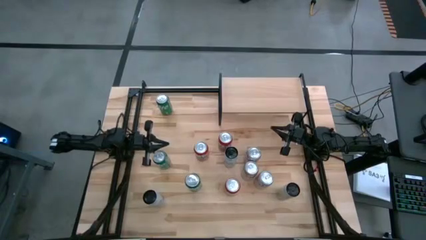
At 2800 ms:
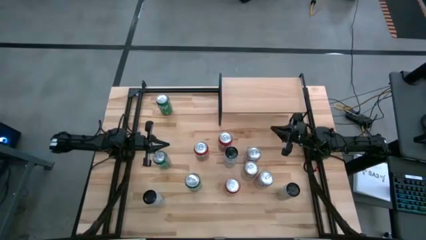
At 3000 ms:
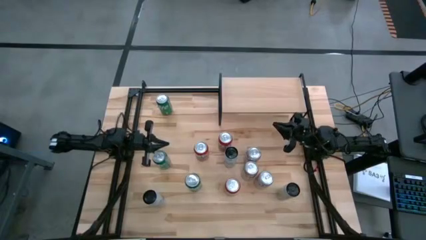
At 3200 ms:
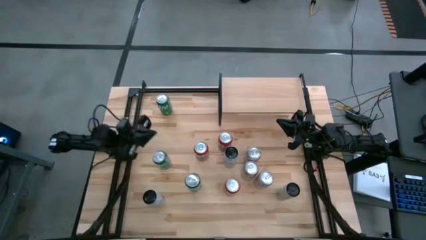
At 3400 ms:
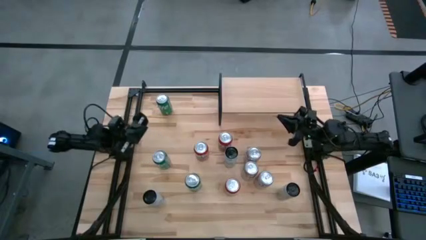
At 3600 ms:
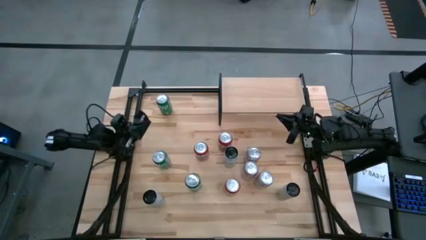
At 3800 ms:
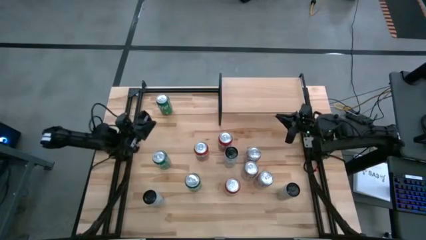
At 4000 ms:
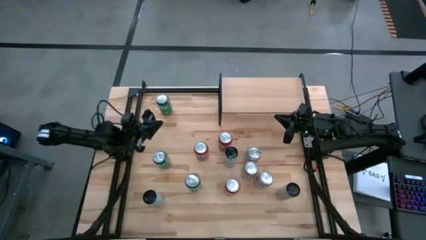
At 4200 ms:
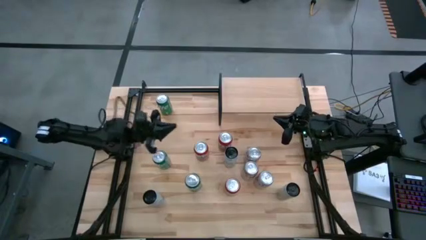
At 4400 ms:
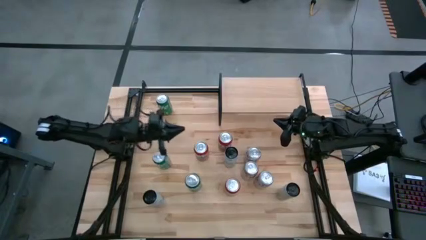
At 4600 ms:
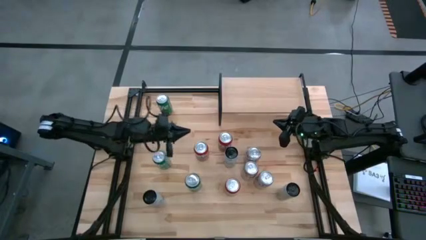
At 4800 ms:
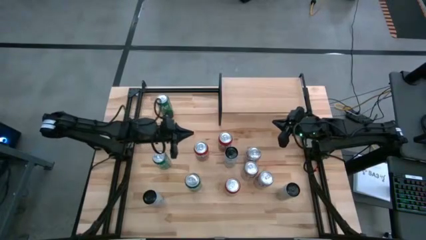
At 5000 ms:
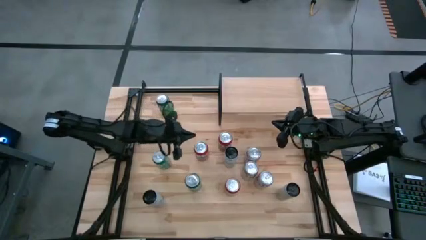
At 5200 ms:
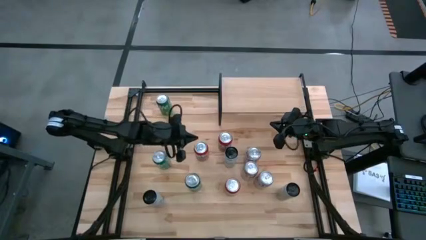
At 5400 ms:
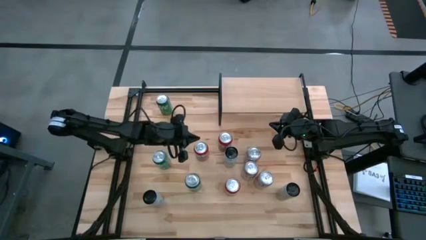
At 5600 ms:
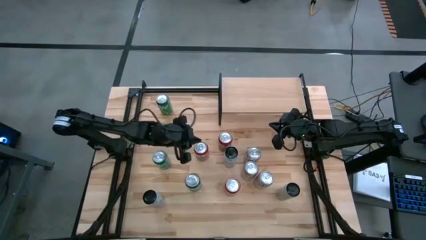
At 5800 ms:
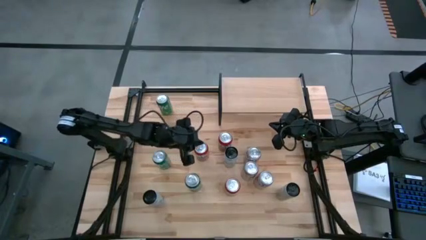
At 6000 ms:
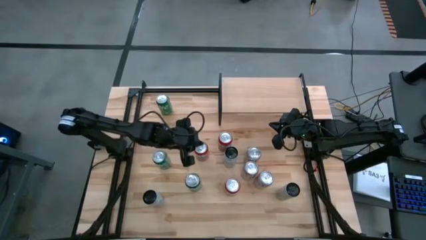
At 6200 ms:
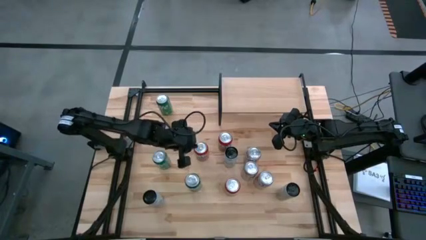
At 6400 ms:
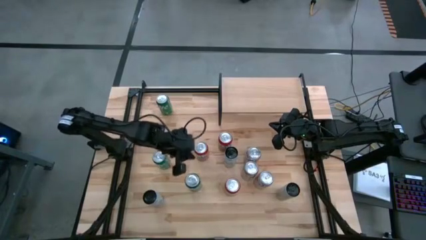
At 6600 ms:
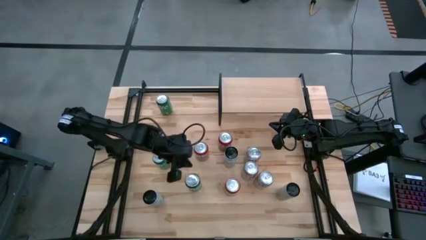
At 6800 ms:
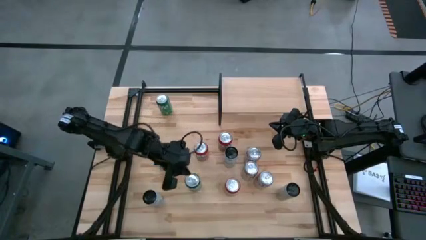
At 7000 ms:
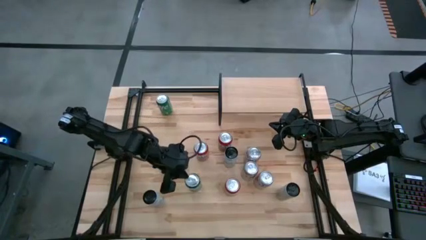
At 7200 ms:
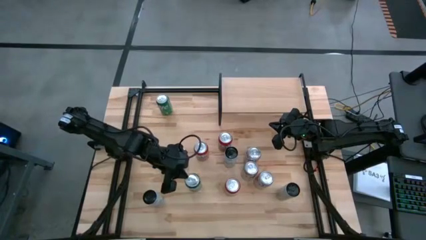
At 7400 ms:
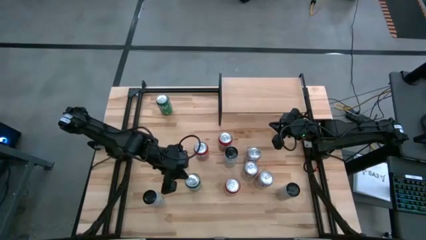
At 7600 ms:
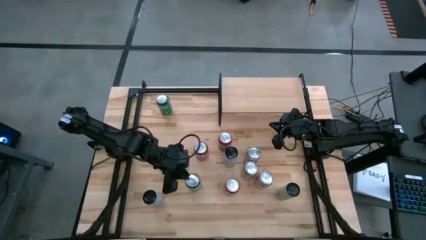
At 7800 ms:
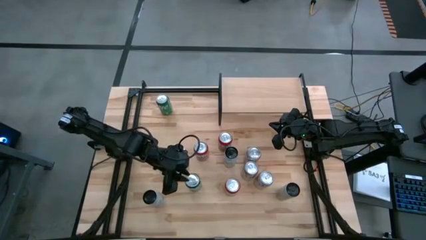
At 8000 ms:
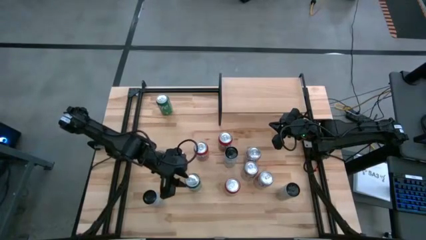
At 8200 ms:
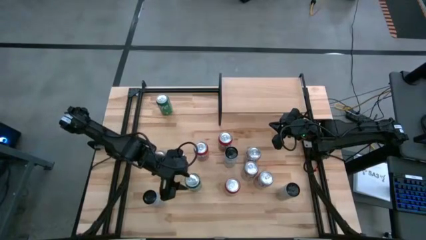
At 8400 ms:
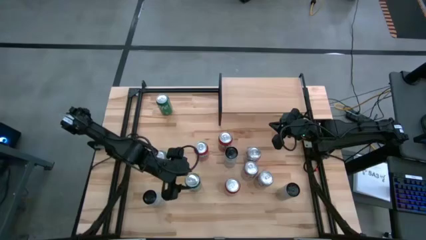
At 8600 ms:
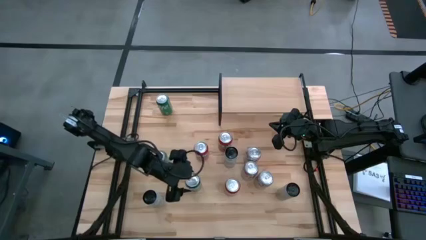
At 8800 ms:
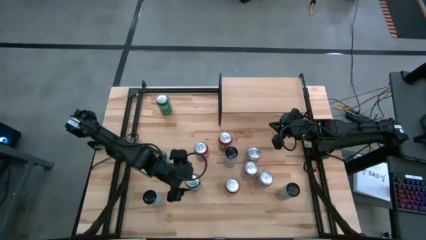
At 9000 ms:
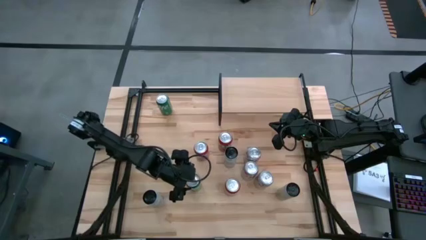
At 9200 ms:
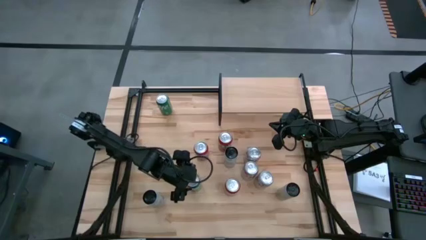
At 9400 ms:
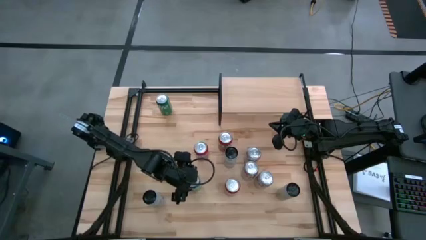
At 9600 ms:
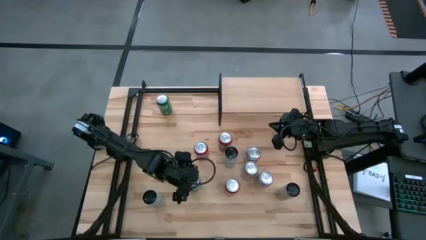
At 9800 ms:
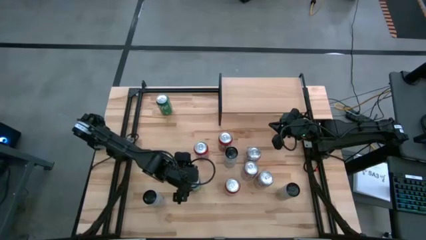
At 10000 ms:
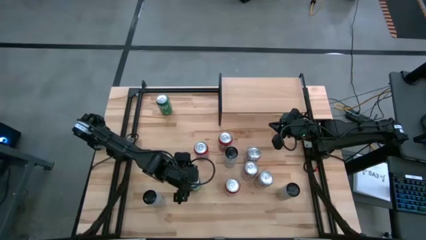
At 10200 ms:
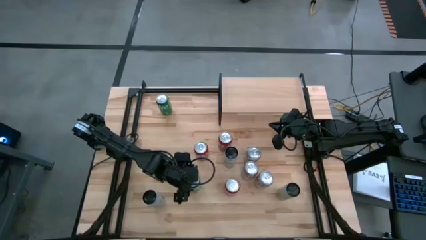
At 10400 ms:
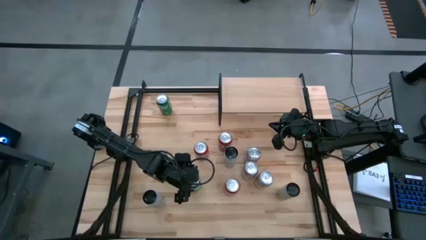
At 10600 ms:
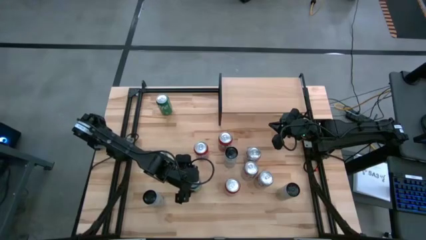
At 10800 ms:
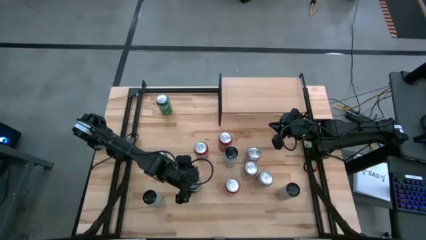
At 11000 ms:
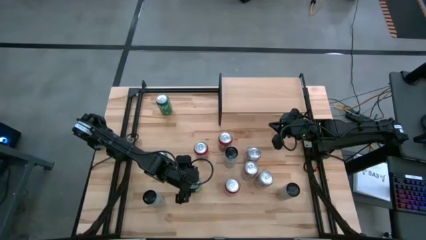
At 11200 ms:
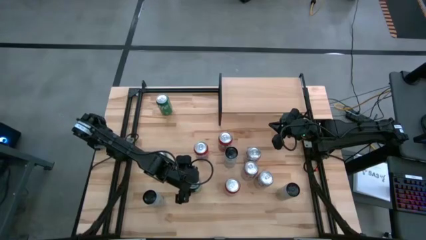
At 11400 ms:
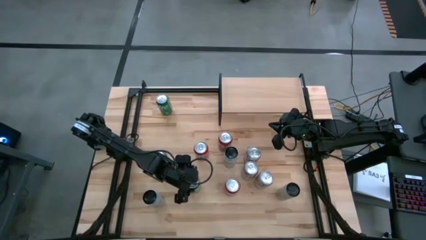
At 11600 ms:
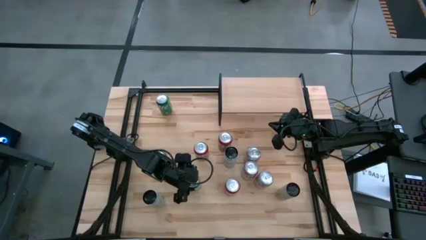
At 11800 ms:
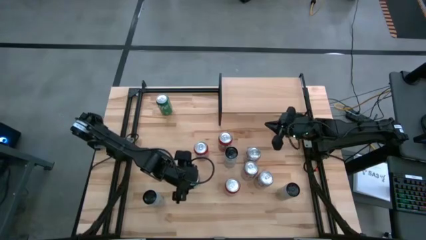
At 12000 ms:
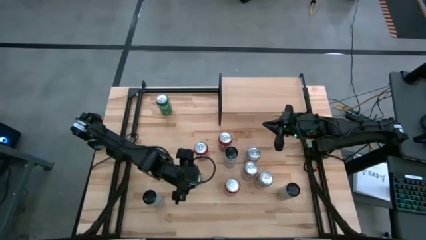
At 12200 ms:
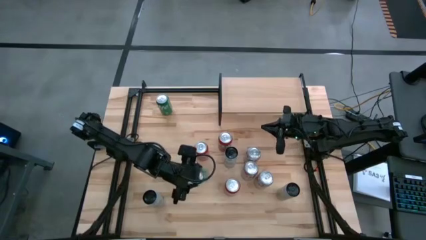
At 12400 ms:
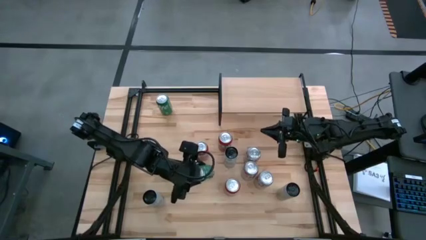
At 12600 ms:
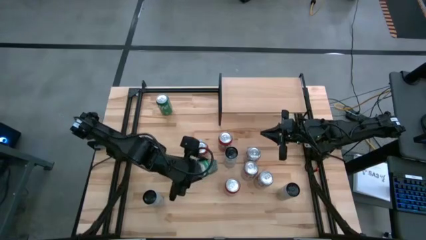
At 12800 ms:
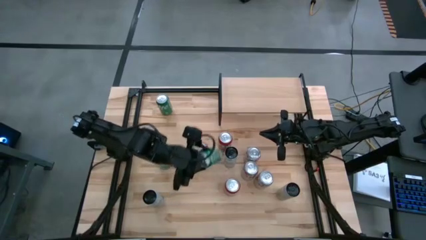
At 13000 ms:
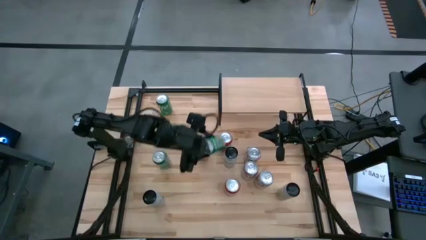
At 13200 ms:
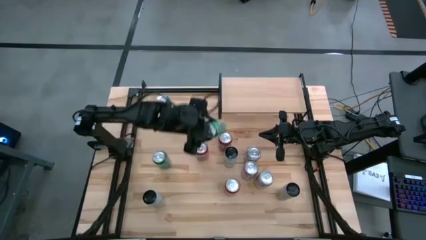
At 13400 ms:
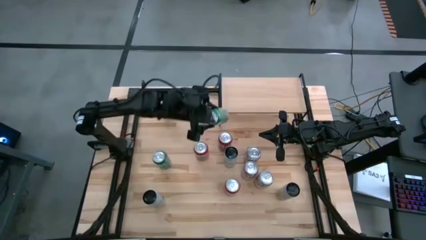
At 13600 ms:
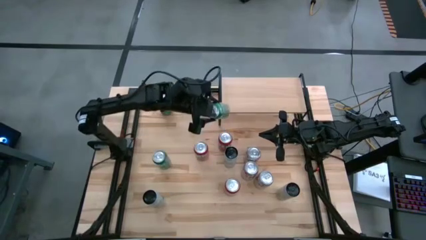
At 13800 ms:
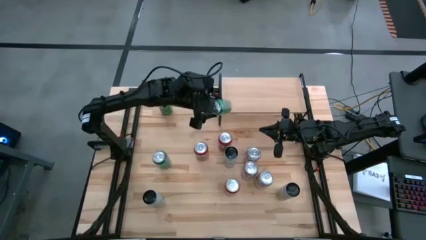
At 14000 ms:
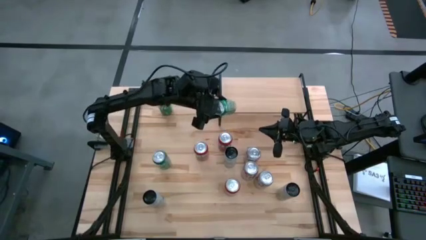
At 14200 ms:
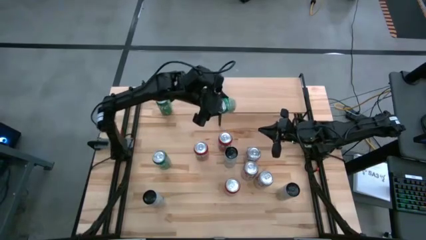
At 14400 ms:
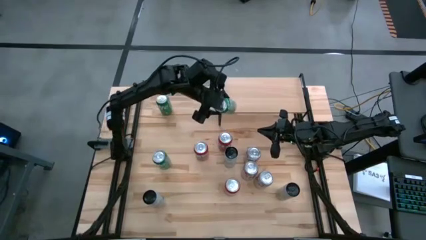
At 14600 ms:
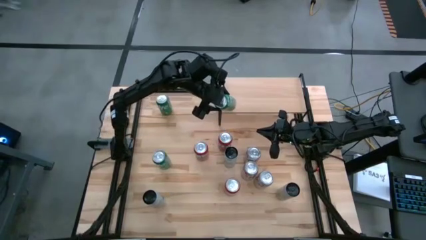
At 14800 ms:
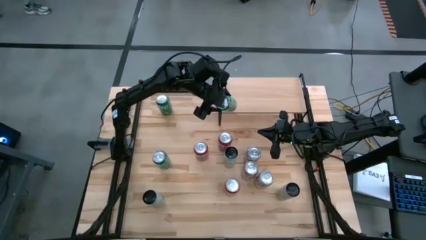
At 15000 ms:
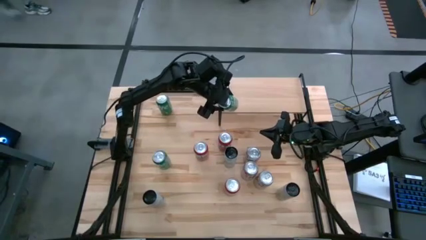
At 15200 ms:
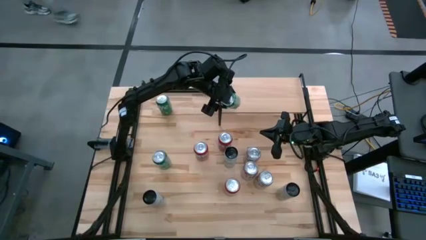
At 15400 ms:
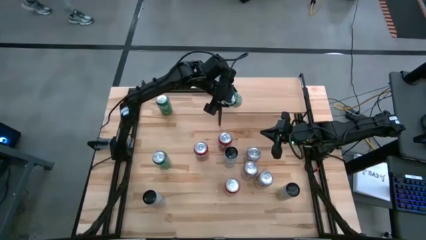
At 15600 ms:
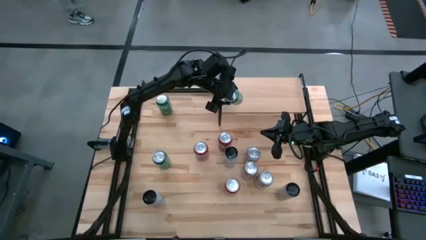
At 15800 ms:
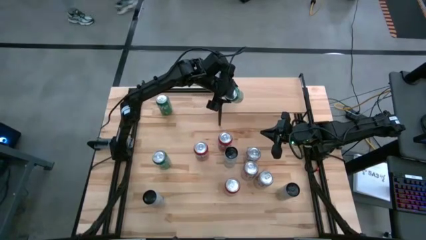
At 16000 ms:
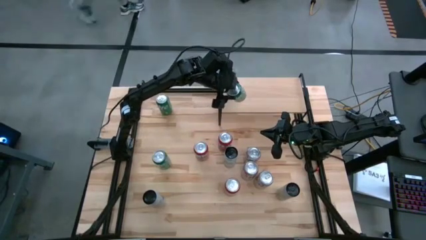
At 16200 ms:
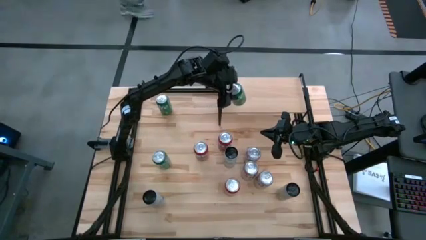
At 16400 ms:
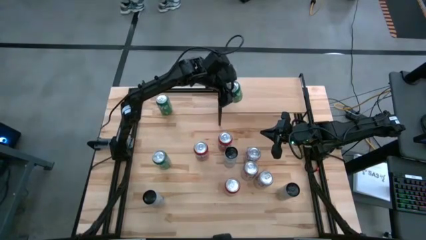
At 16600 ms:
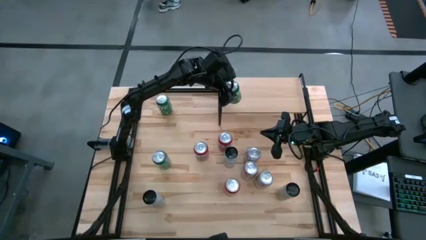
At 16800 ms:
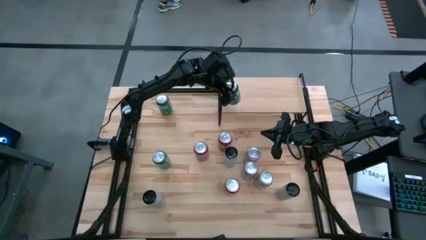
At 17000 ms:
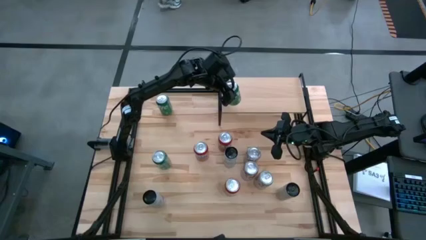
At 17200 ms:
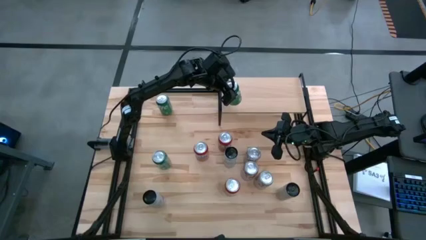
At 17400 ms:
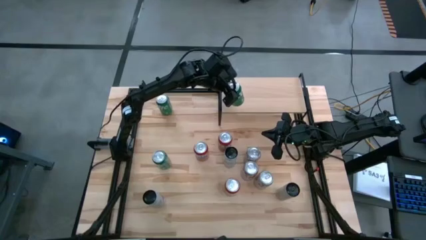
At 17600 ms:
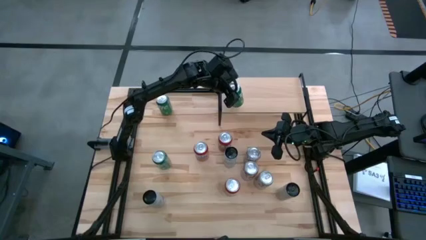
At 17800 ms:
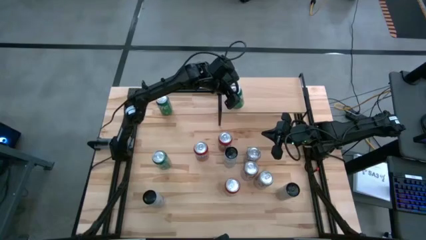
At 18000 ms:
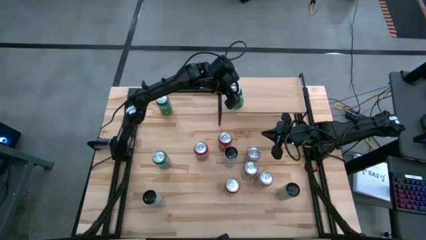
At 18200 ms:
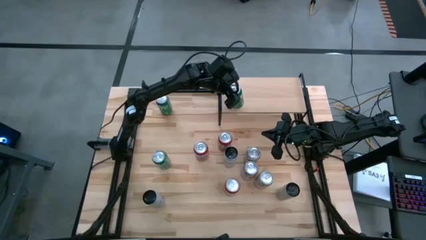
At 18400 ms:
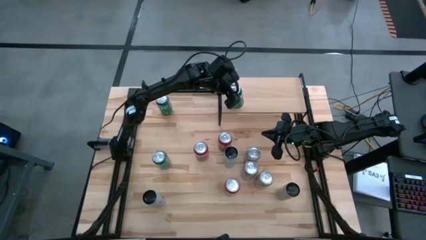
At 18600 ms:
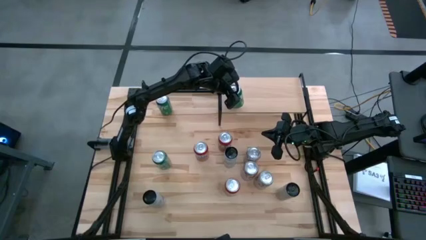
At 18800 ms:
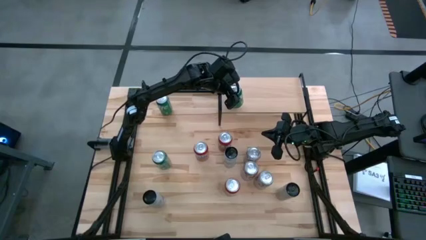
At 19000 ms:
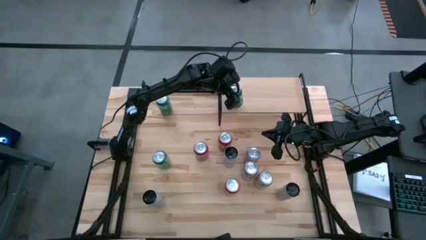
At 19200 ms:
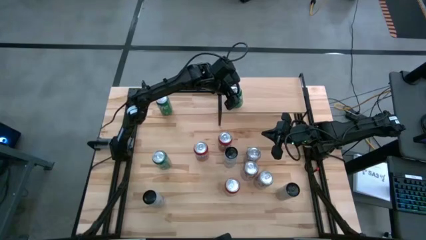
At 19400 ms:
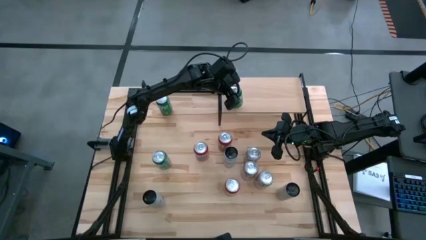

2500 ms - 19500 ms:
Task: Place canned beverage on shelf
Put the bottom green soda can on the shelf
